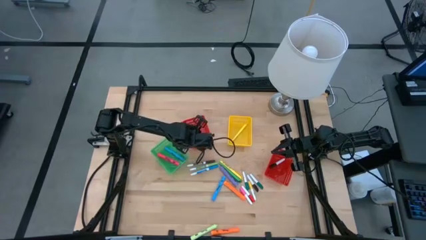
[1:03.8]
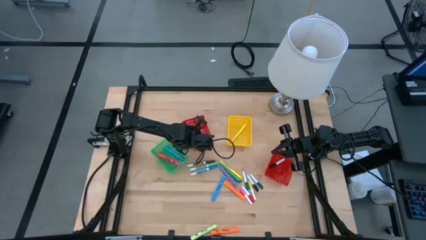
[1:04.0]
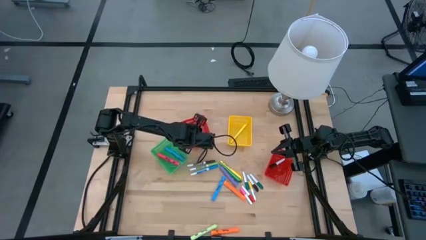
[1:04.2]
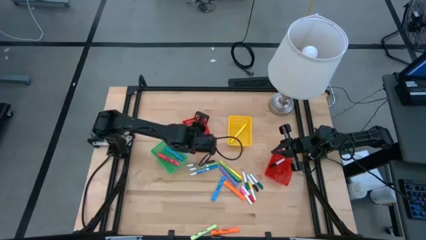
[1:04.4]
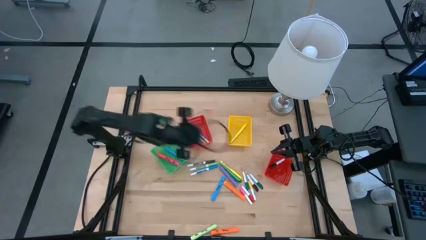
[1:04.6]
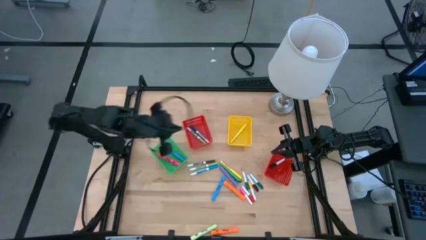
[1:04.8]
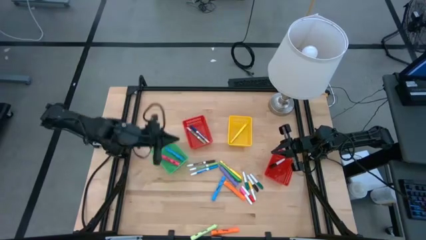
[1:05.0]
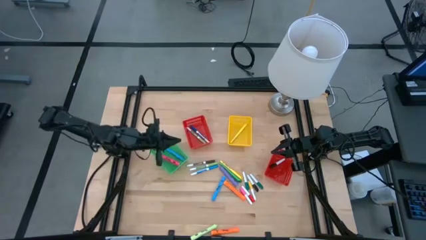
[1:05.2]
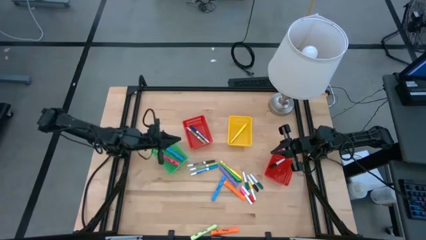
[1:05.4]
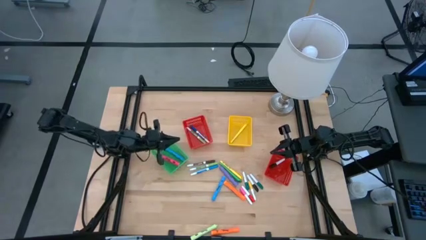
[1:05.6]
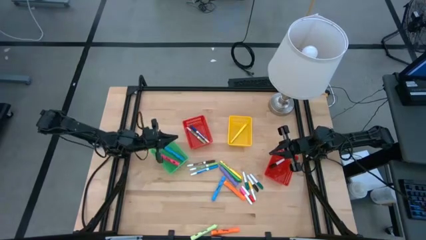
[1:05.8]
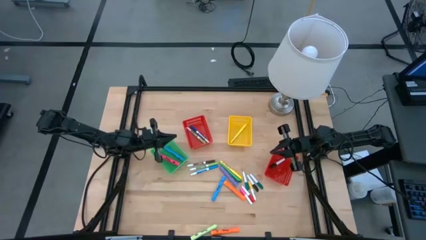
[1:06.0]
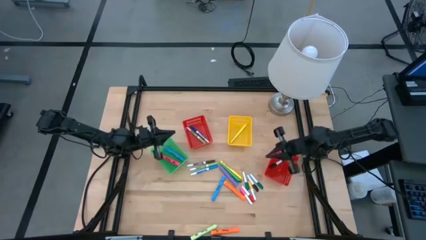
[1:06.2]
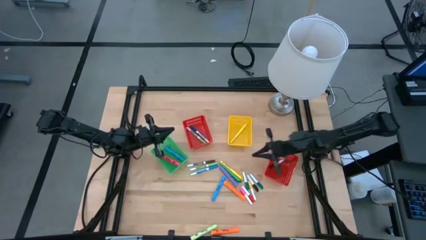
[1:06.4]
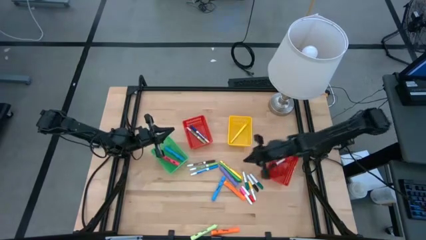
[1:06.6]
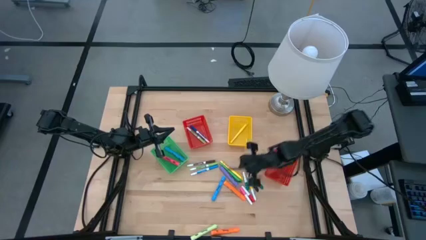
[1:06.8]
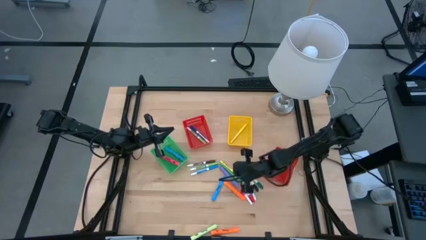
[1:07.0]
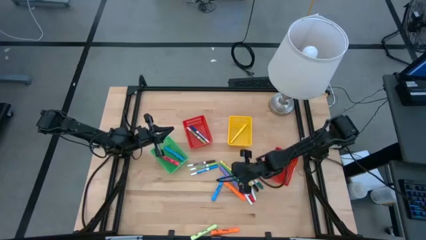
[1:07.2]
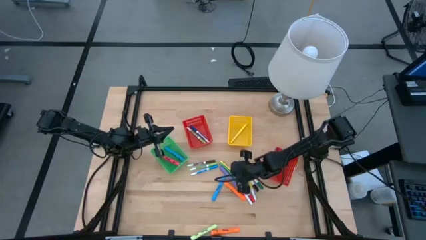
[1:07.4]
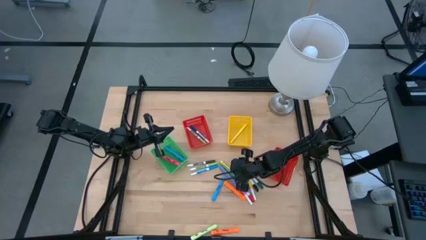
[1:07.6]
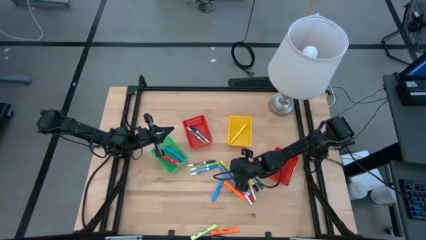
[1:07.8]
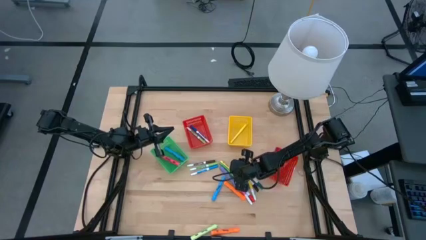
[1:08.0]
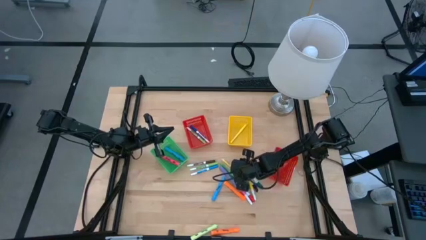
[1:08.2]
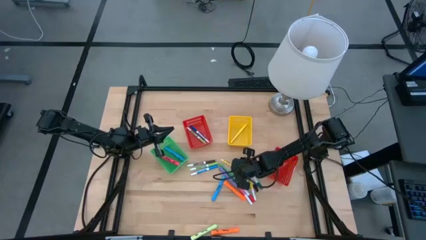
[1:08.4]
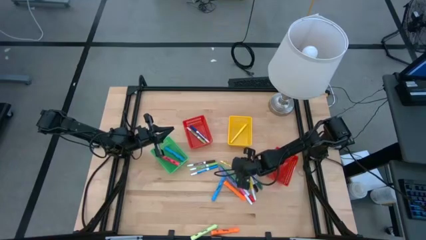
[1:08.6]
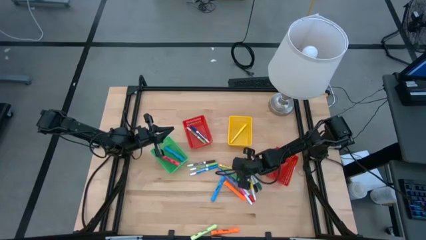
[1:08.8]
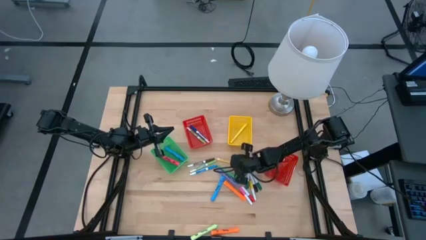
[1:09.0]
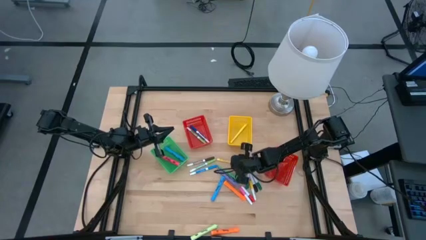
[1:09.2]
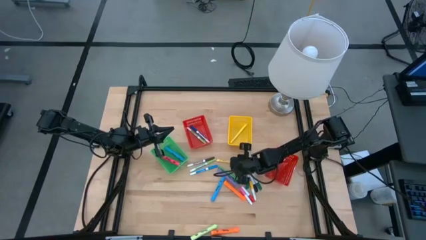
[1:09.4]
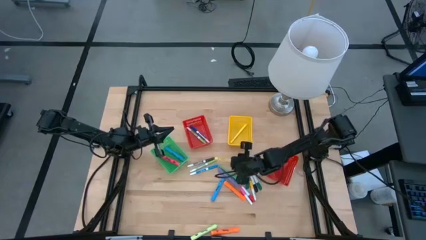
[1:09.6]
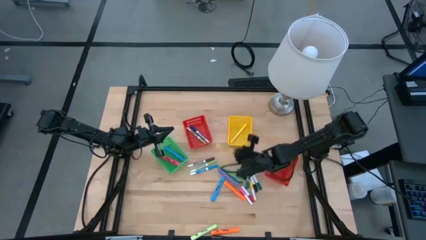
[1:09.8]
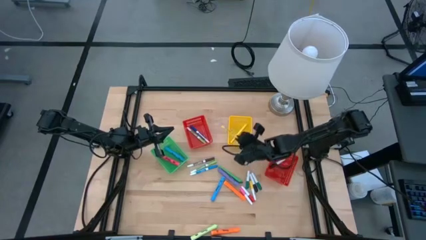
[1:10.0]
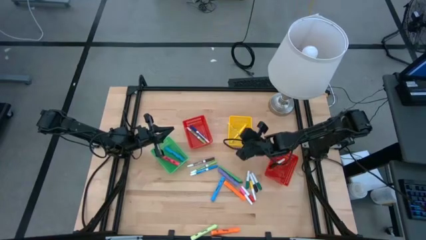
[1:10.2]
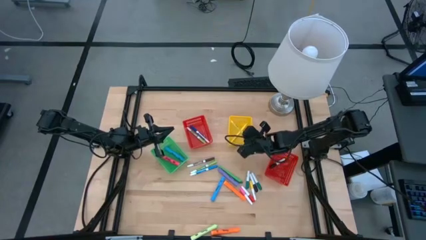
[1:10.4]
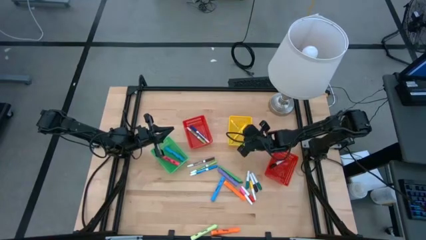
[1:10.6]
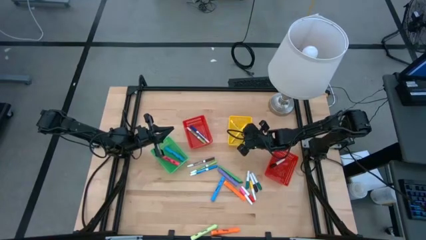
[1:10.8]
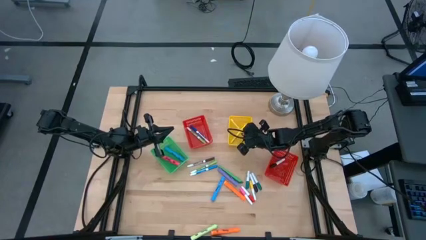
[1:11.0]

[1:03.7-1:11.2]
Task: Pick & Place Markers
Put the yellow pen into the yellow bin

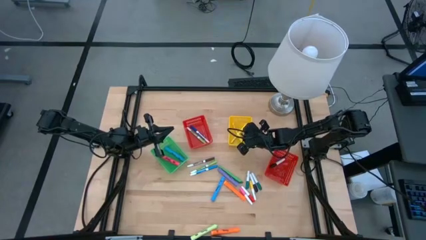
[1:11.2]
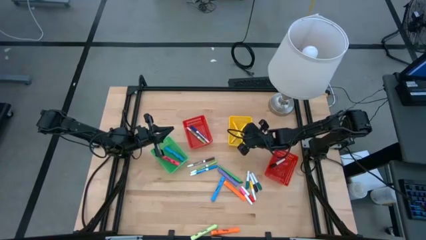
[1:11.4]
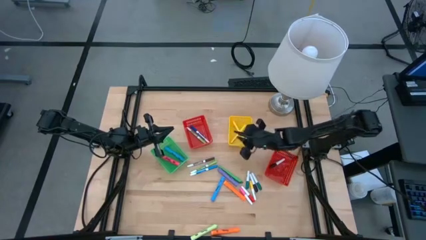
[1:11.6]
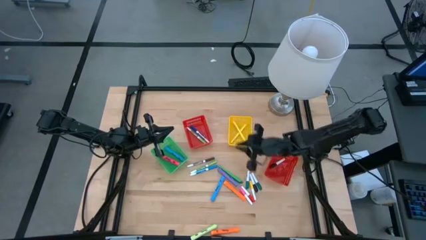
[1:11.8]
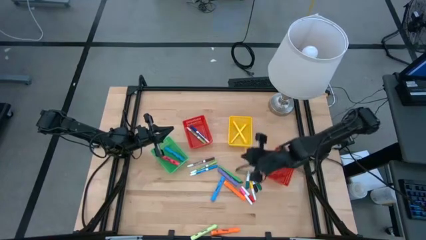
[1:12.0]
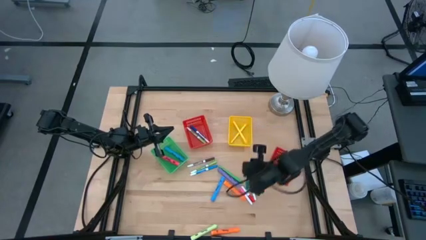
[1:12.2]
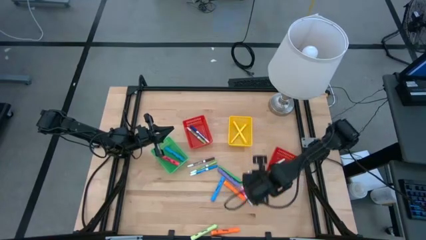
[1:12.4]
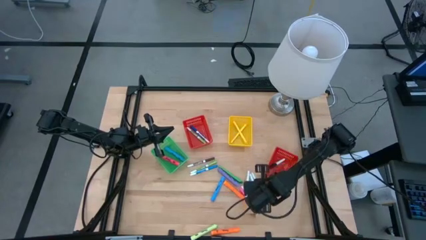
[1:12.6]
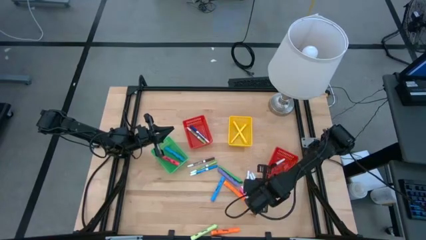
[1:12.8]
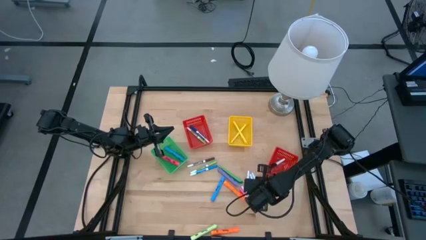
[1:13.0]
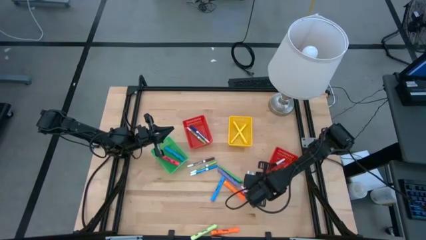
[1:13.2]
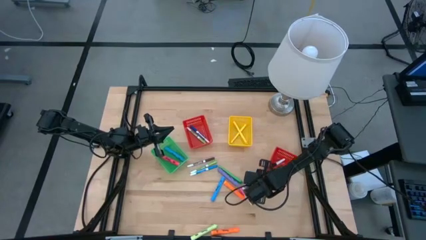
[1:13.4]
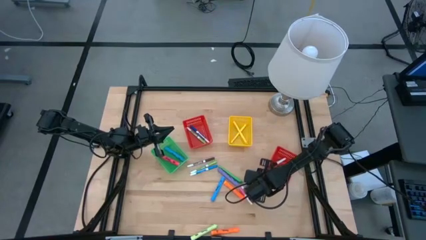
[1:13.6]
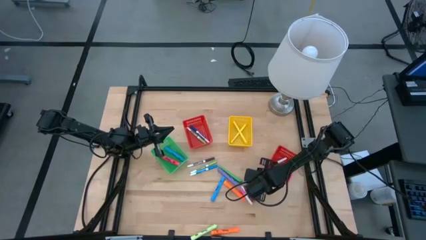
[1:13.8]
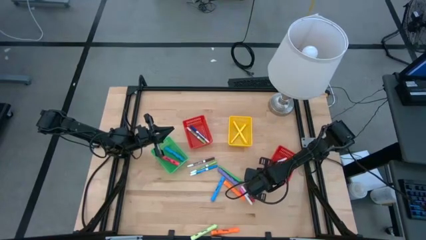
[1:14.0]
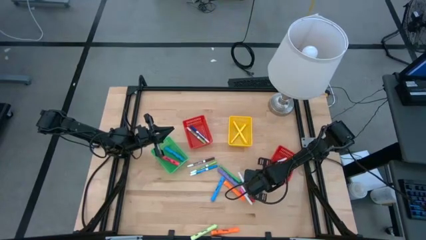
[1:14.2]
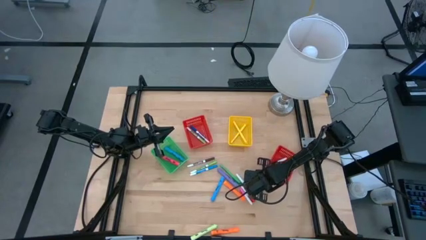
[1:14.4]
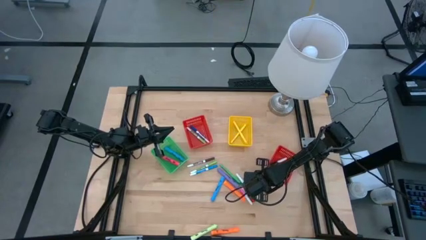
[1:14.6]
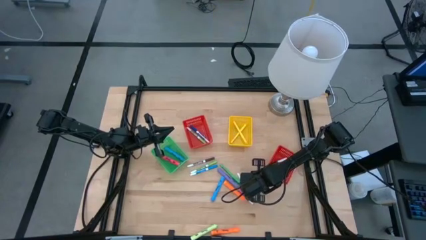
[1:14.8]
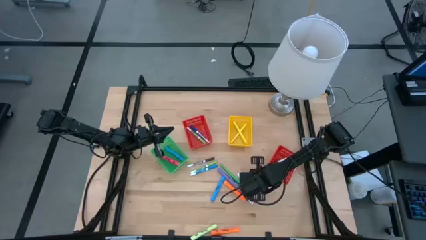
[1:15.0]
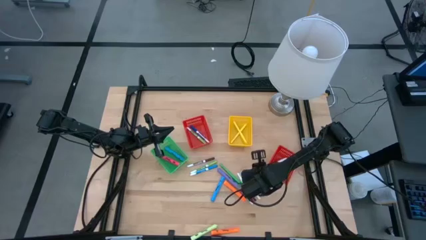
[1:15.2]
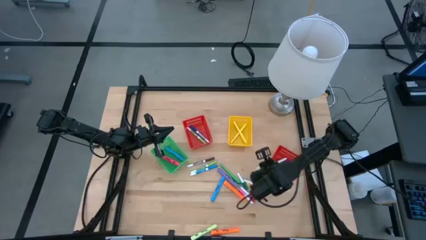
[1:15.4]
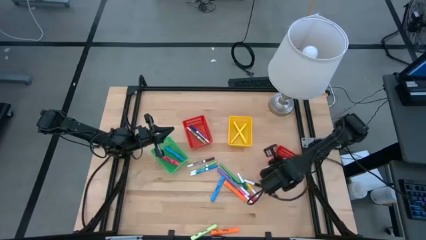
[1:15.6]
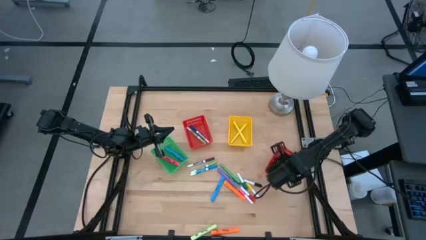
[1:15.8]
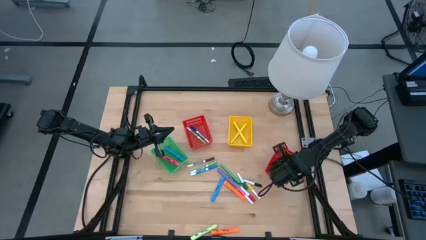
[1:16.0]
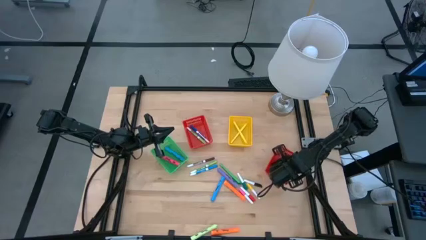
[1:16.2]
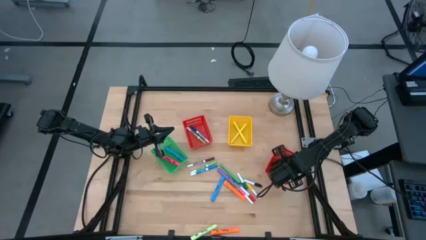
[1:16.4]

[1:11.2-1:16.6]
Put the right small green highlighter pen into the right red bin
